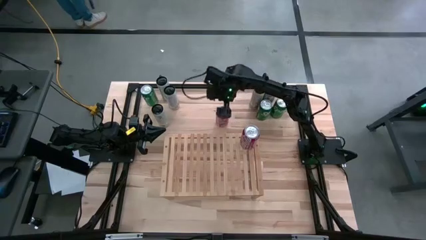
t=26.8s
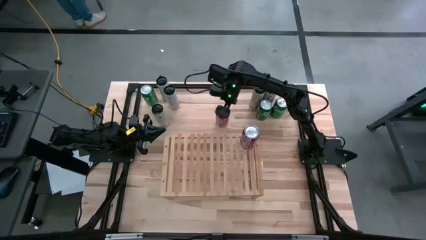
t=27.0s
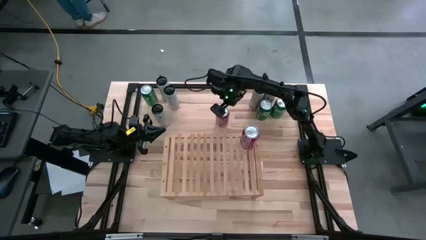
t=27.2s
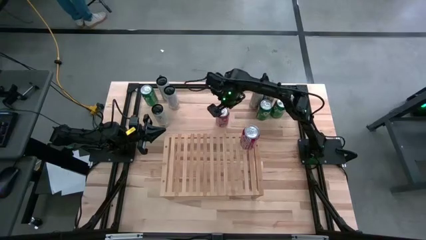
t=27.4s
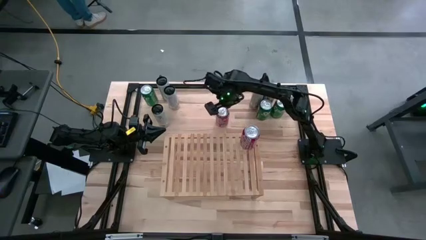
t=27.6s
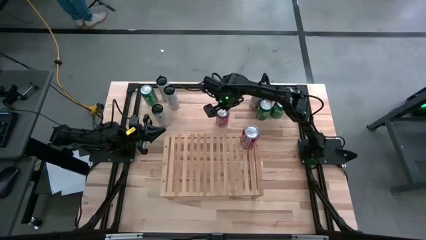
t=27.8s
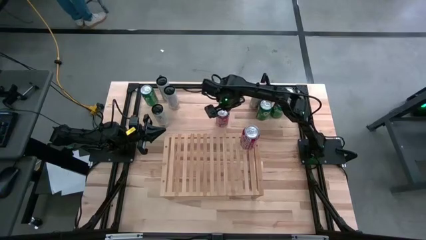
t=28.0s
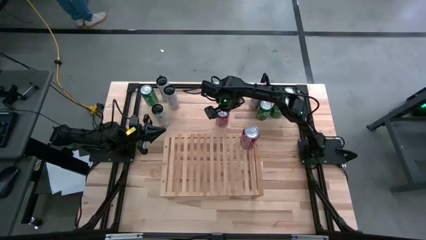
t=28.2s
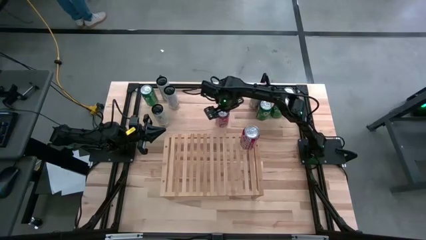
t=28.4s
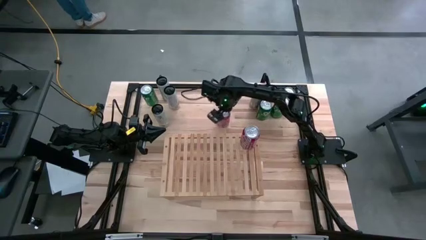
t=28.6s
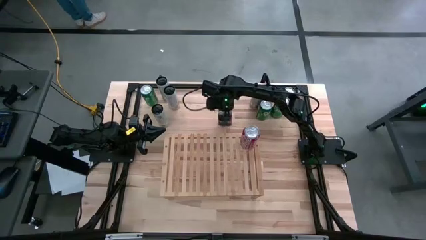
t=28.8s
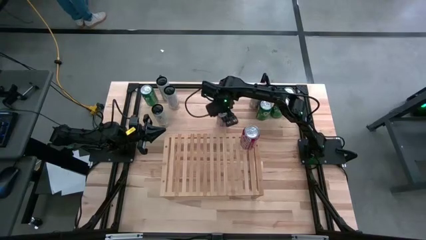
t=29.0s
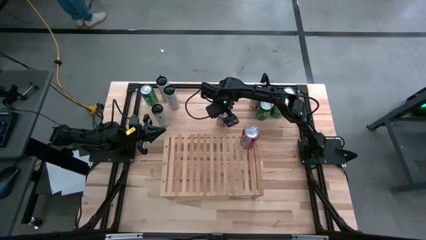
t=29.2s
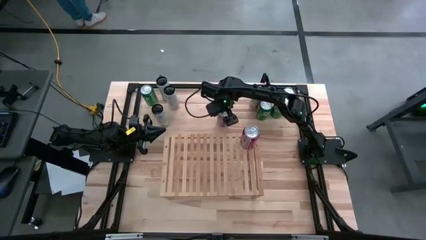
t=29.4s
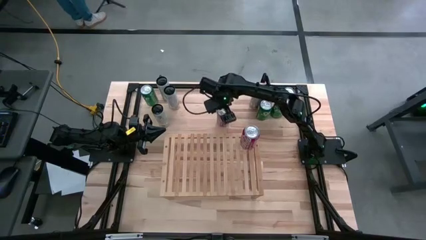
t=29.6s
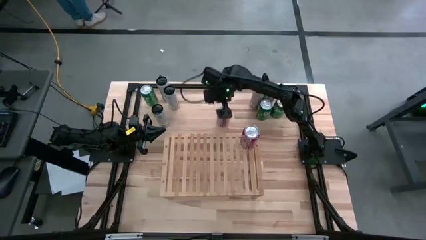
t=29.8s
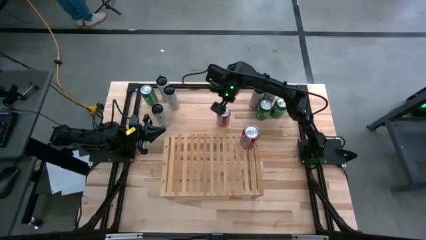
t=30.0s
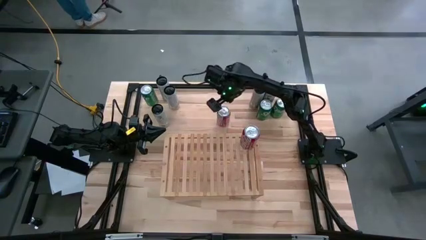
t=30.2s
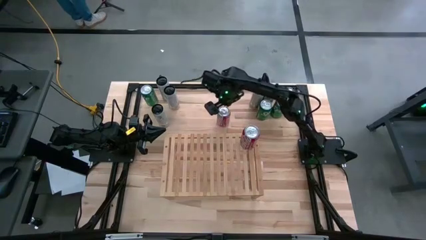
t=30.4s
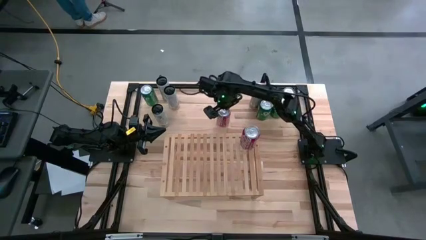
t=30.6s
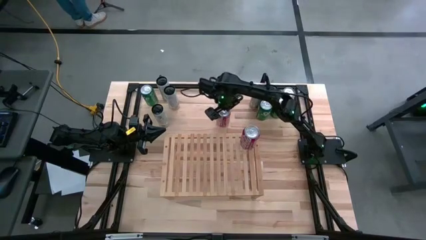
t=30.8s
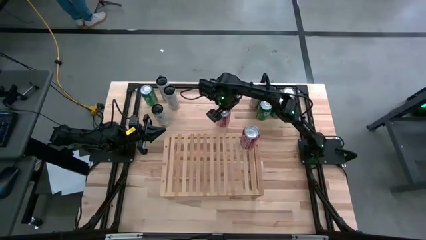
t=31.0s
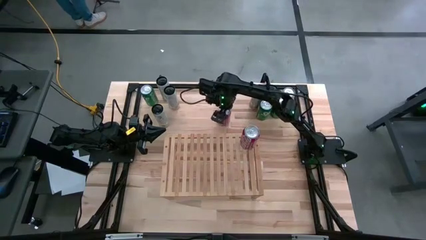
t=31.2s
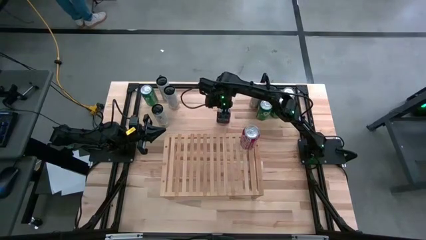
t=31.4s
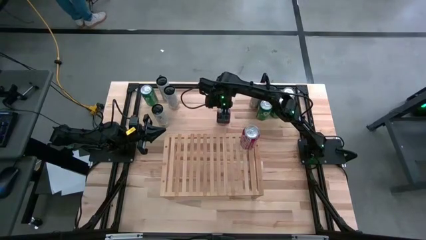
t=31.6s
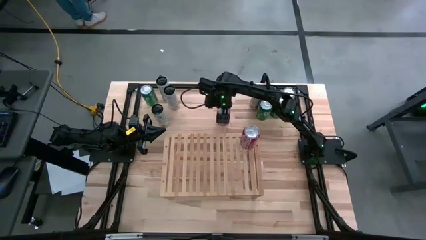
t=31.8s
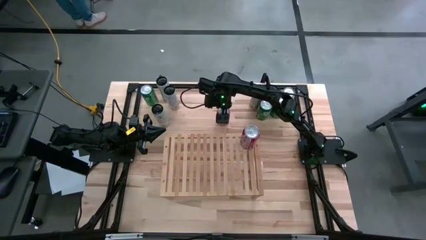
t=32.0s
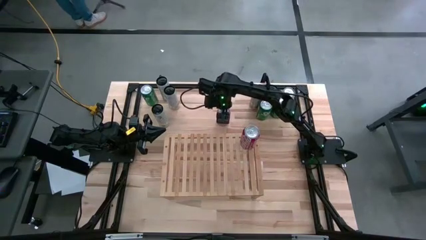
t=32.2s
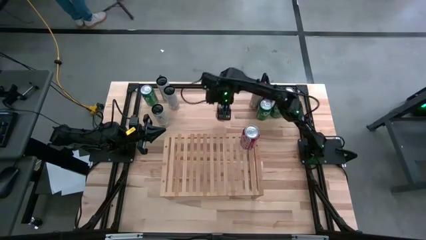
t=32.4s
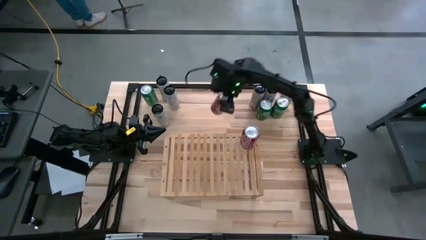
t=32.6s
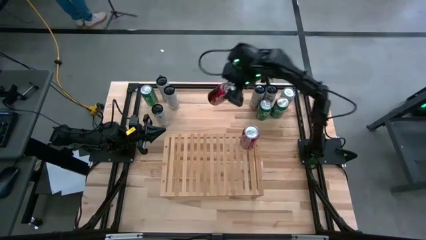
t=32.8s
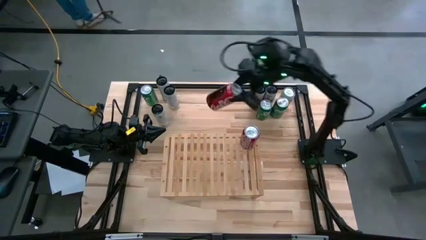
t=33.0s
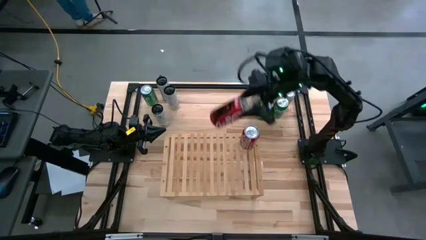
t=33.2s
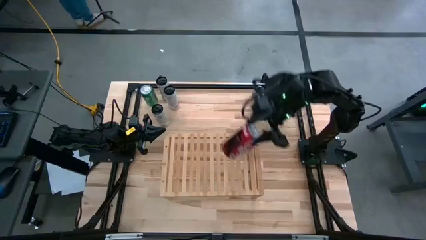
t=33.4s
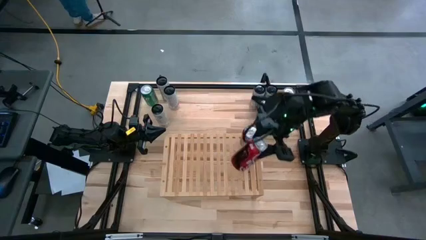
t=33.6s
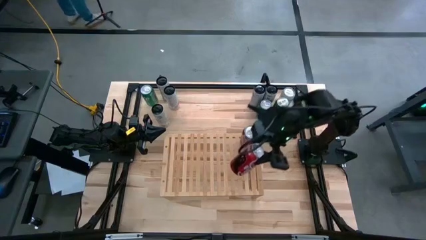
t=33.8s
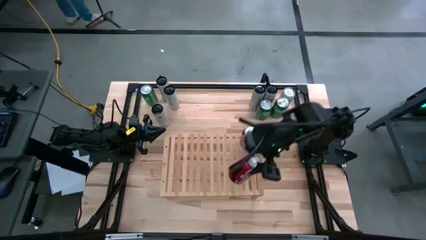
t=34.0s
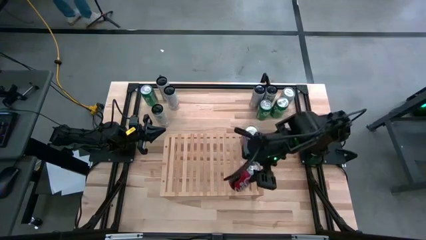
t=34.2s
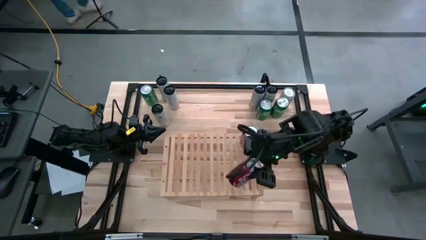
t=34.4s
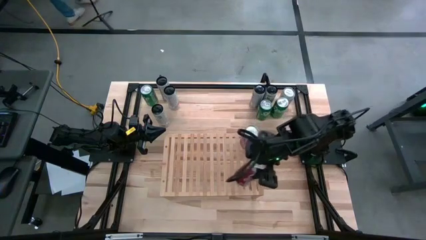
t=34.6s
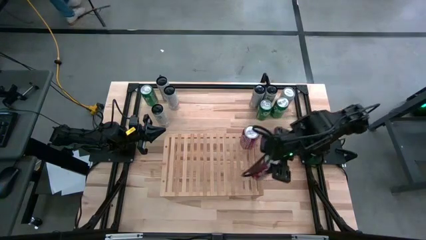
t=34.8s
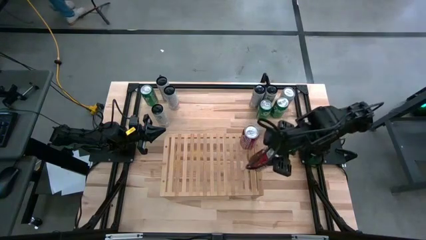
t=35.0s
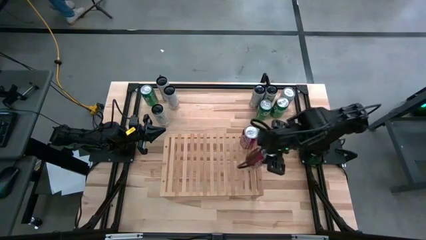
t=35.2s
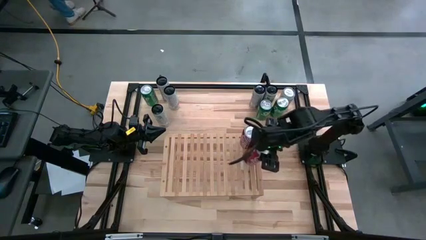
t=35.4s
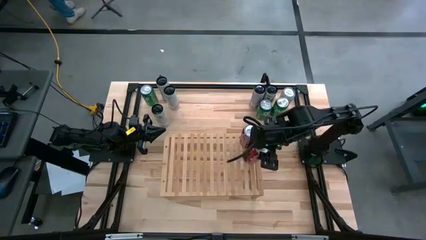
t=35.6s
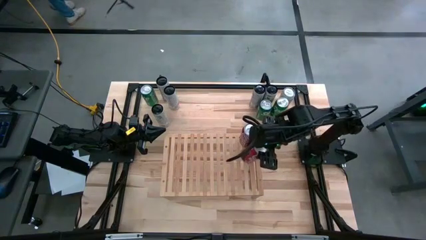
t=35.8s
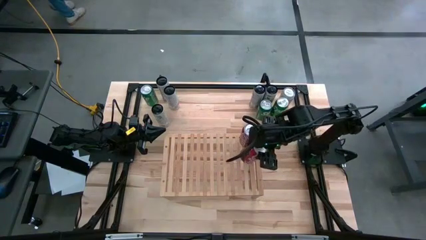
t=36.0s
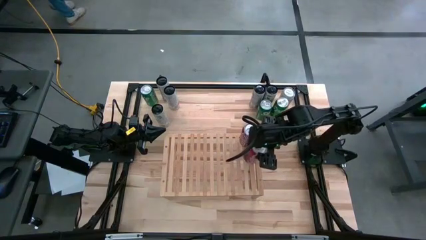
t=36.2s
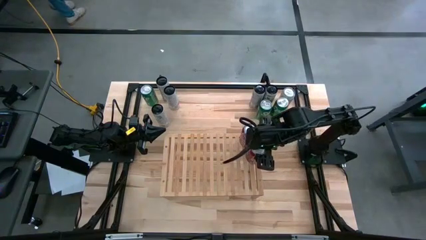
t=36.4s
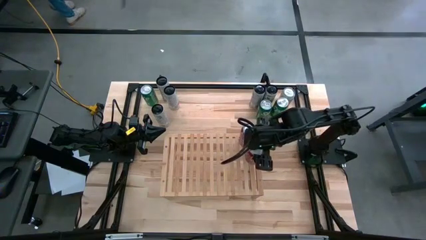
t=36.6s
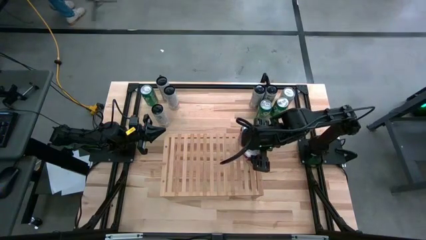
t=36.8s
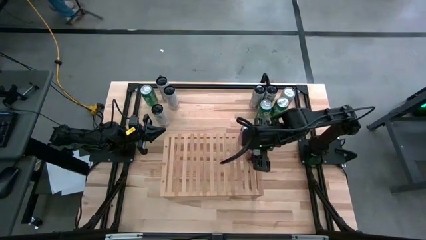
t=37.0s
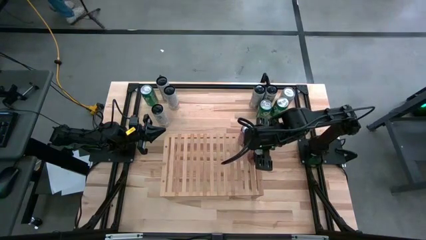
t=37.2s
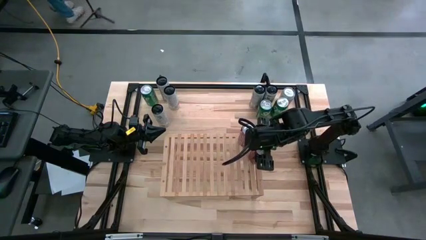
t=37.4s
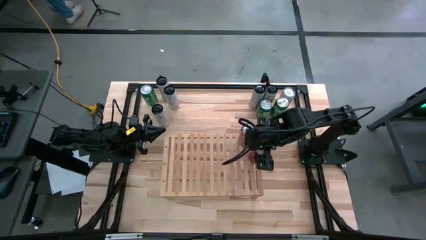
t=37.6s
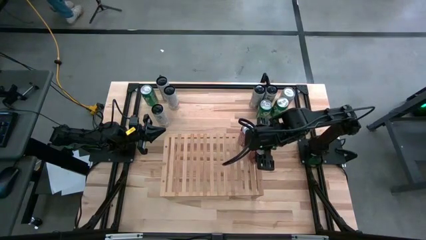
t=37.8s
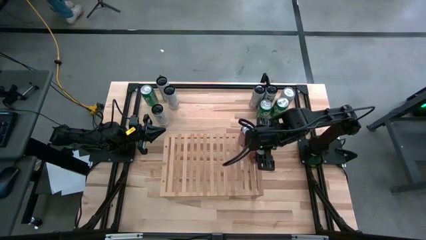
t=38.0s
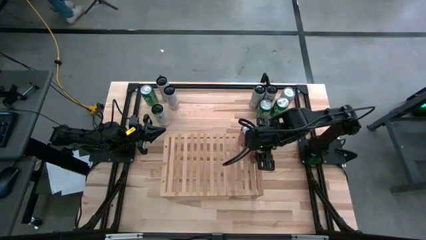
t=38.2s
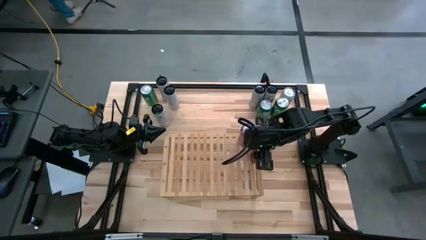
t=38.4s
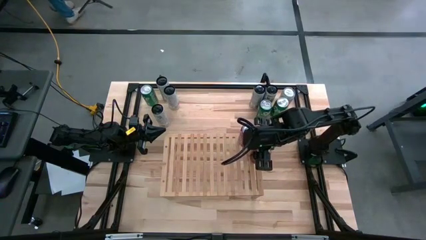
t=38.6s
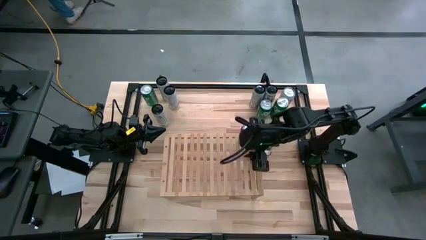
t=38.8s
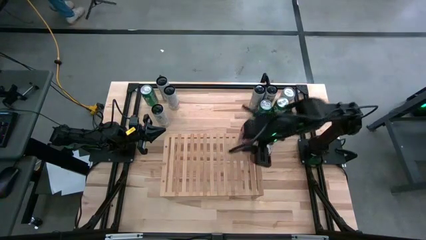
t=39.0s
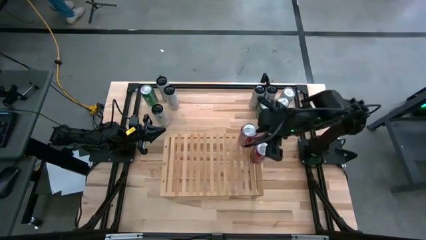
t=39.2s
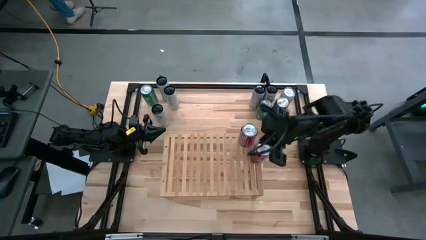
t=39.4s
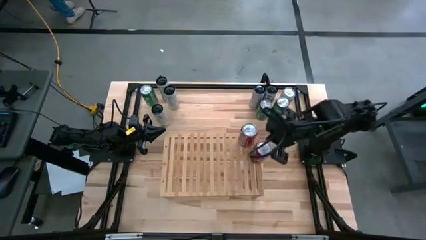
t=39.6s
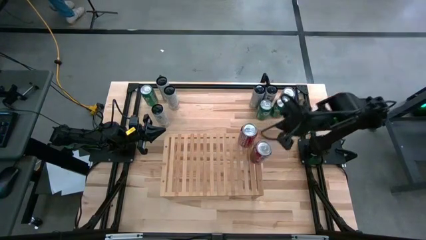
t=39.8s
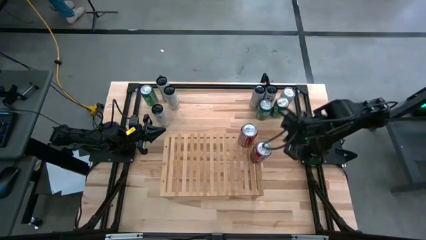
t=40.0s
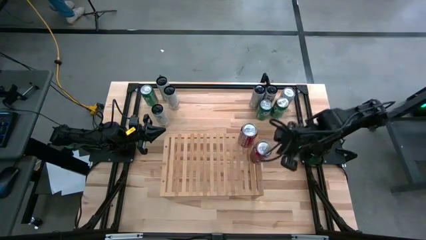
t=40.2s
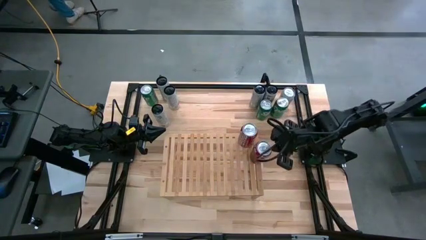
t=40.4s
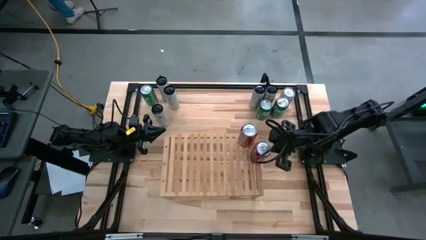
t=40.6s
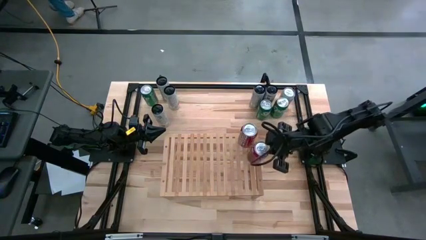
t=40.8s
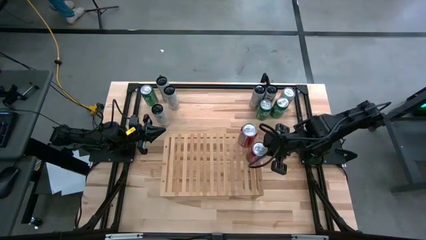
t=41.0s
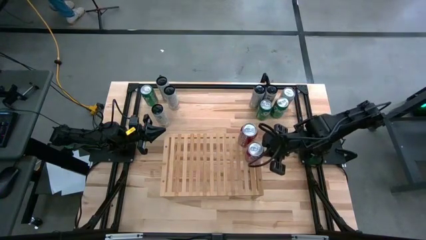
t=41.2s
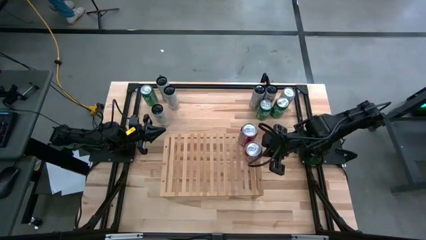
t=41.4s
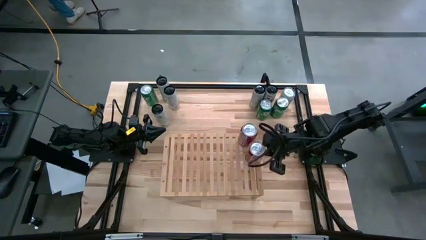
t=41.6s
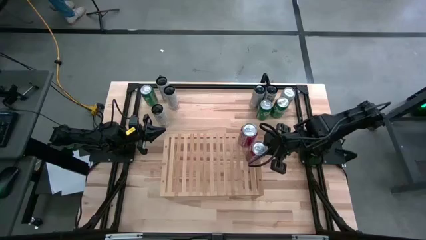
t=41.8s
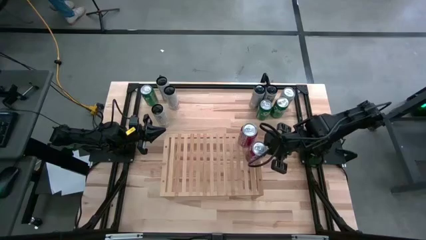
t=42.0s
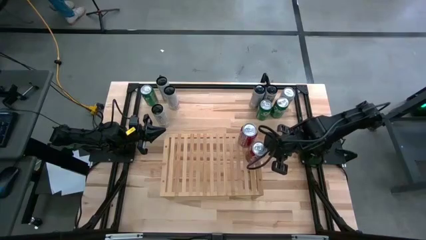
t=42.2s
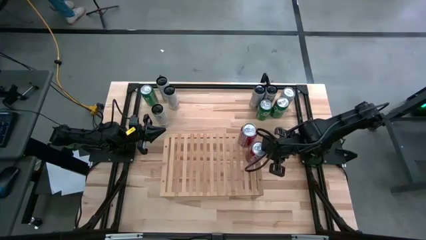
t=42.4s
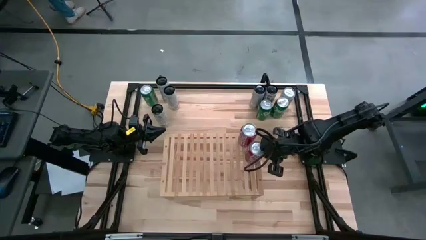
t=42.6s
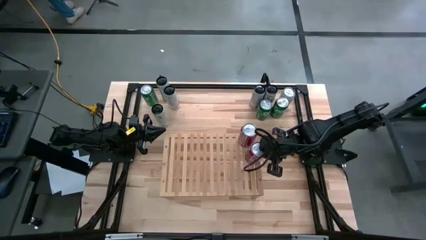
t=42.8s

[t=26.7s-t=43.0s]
Task: Place canned beverage on shelf
Put the red-white soda can on the shelf aligned with the other red-white soda can

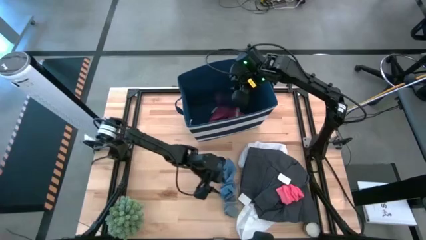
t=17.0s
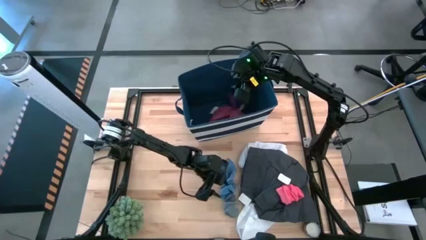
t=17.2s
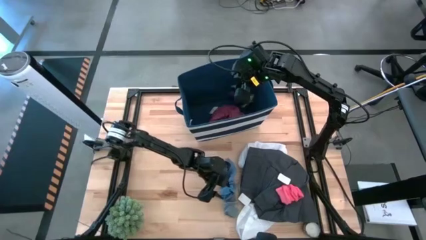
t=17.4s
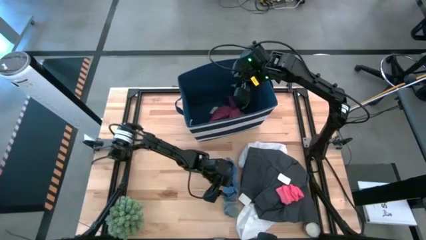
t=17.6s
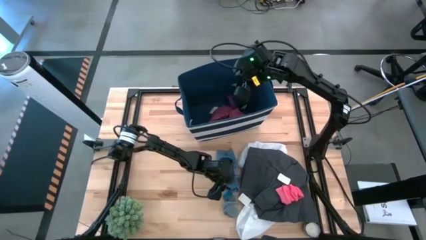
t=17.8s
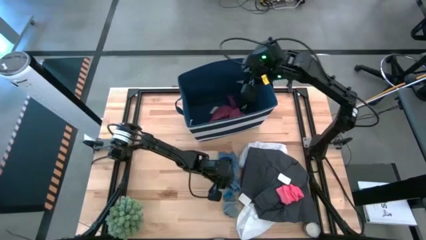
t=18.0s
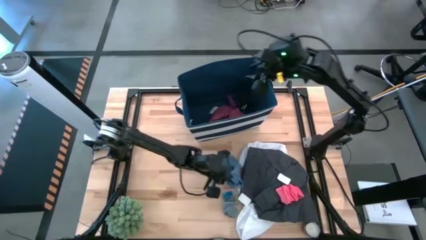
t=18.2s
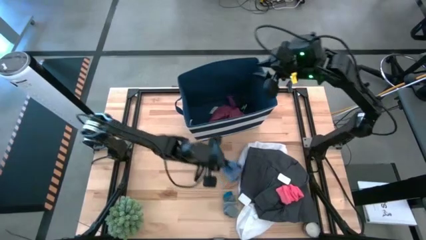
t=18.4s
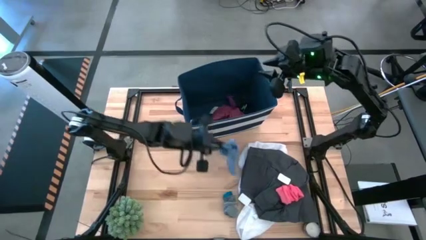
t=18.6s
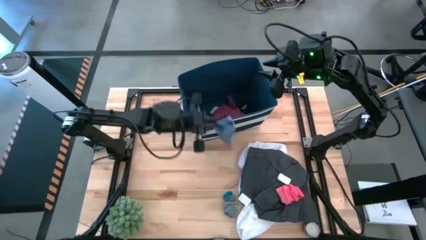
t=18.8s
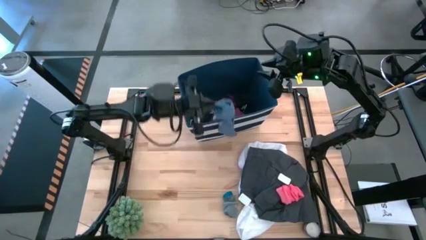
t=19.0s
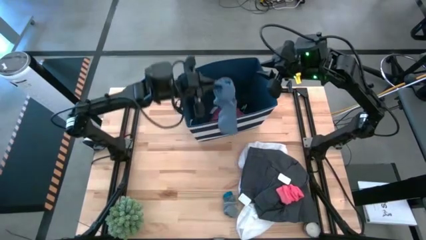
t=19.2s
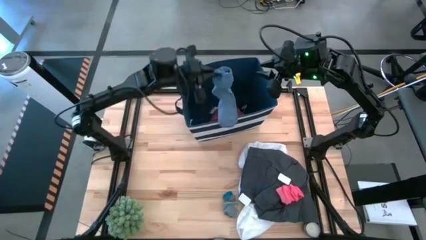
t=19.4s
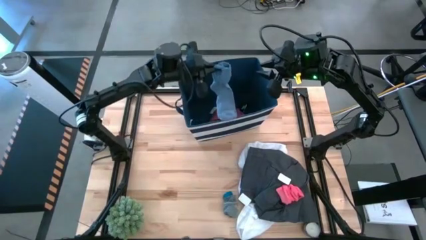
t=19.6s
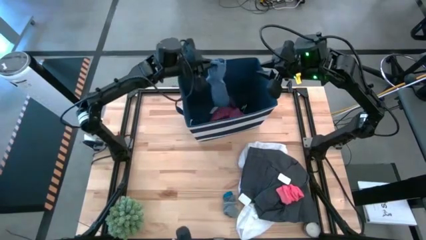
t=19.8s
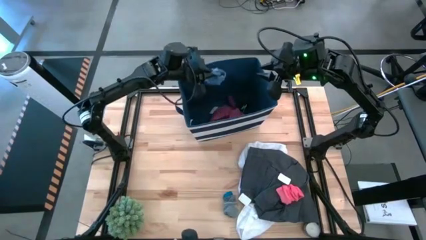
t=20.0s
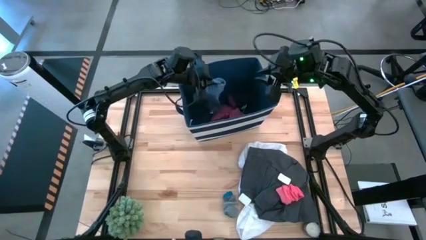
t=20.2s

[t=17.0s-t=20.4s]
Task: Sort clothes
Put the blue socks into the laundry bin
